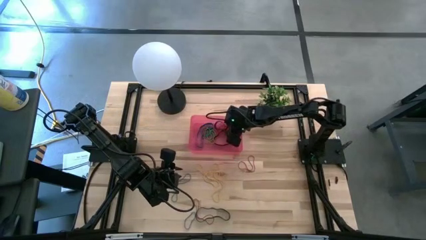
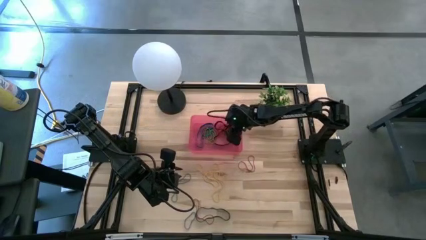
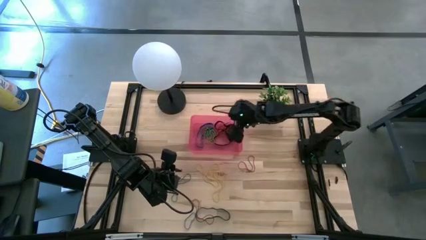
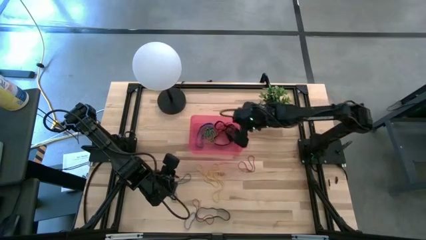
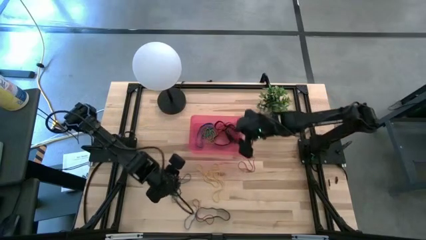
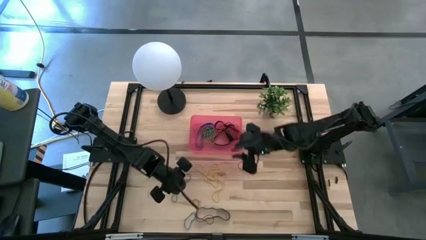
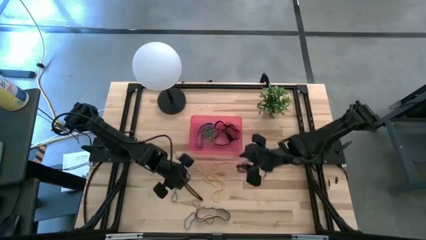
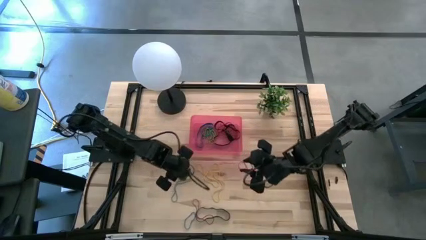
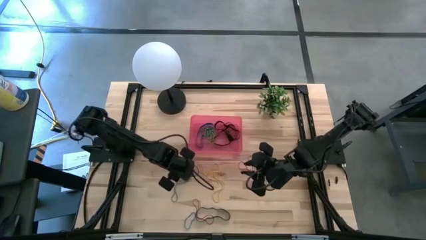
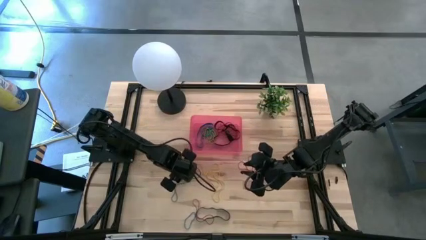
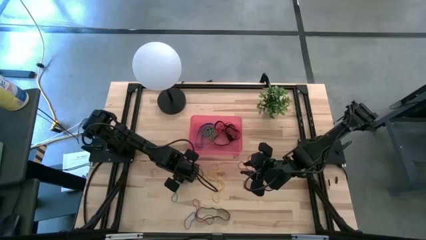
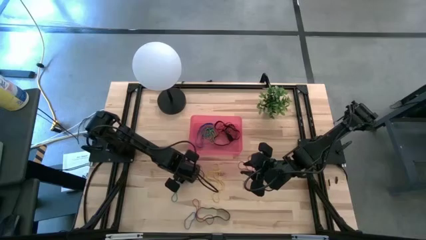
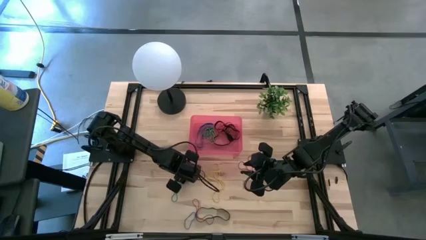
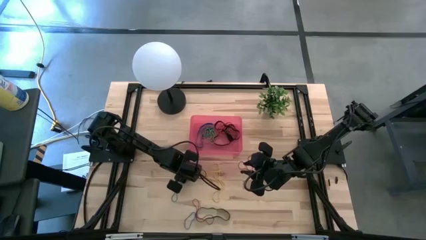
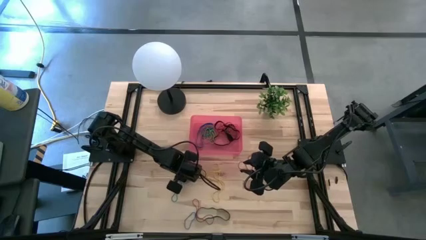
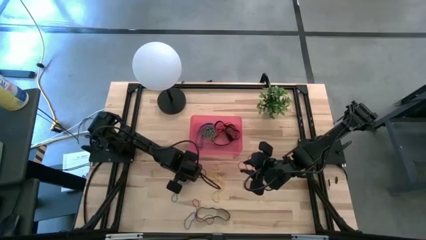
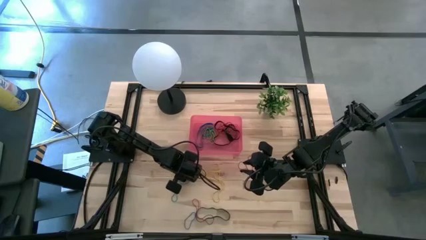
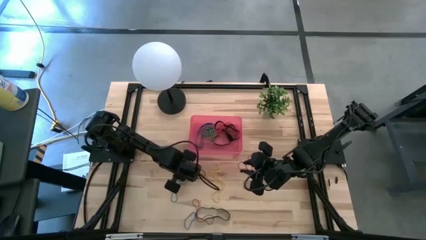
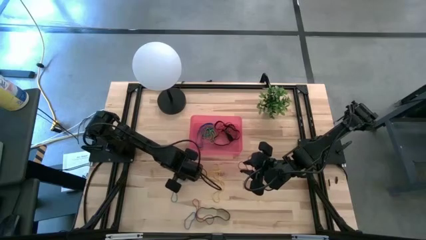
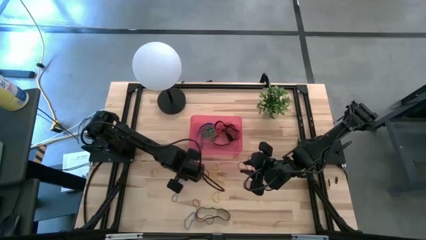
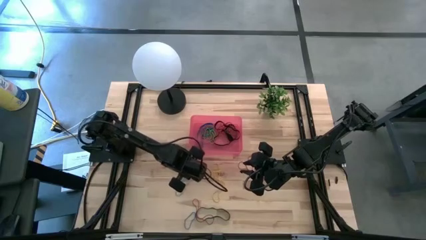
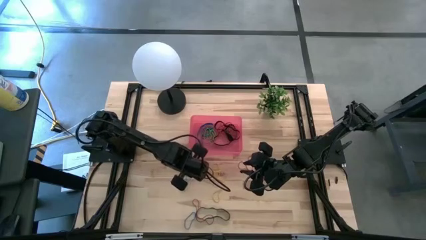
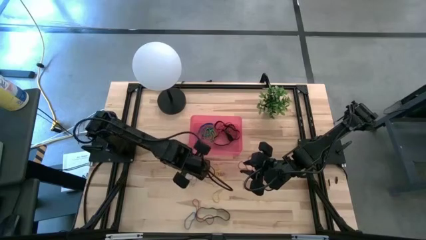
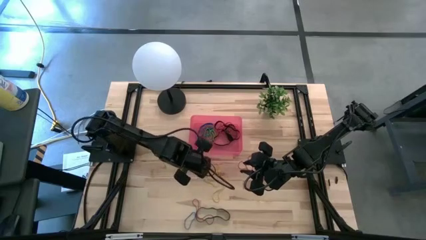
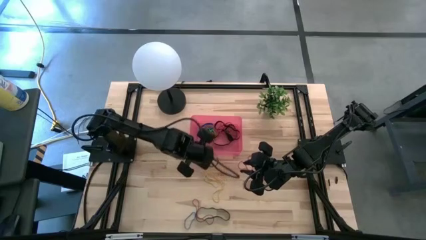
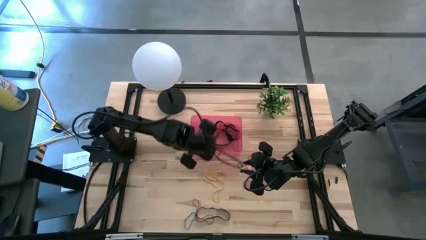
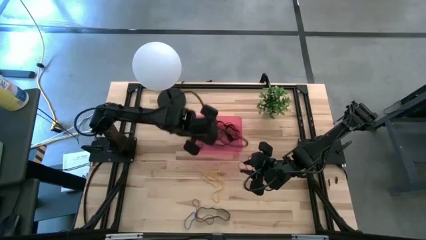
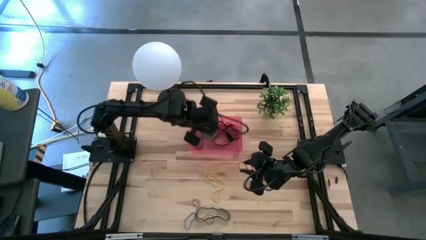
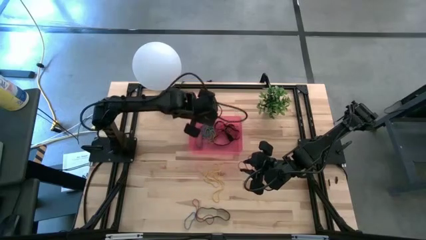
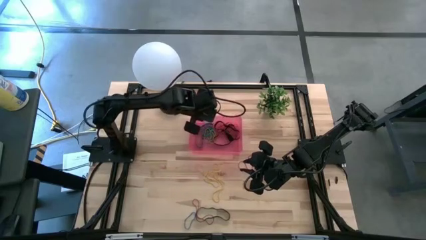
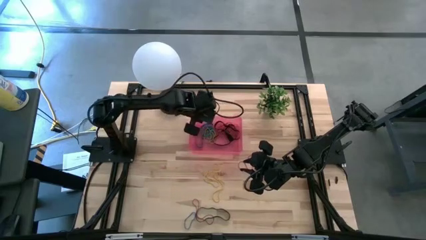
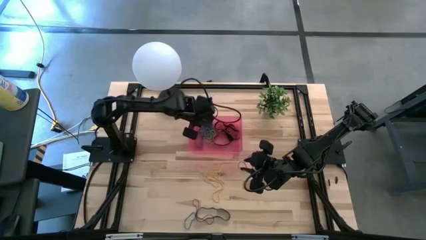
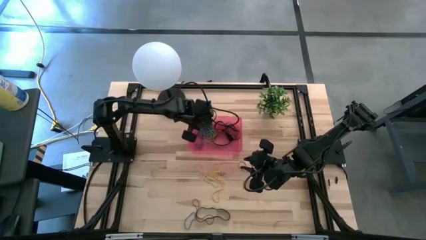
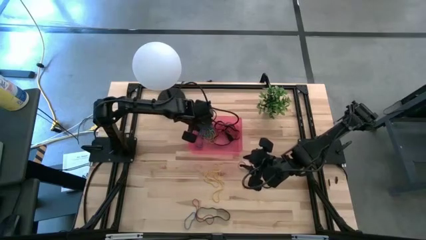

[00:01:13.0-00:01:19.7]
Task: Pick and place rubber bands into bin
Put the blue rubber band into the red bin

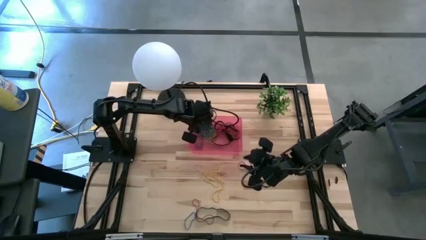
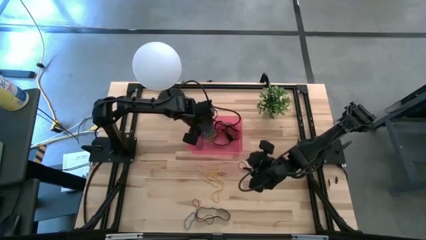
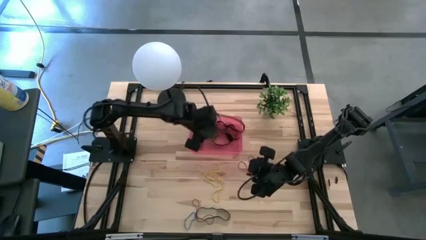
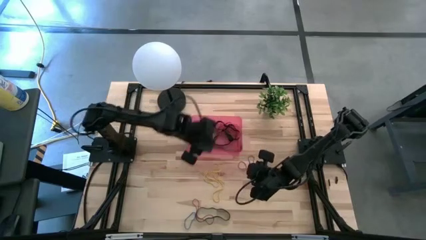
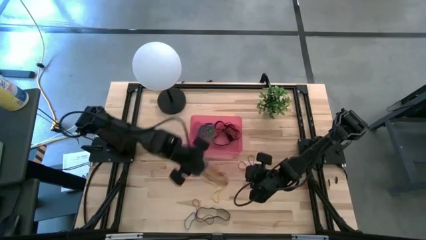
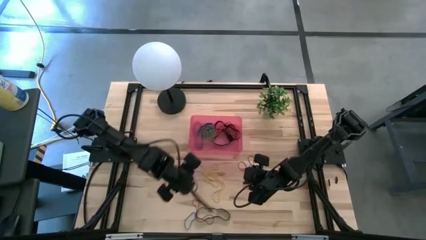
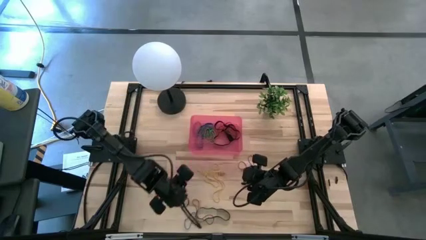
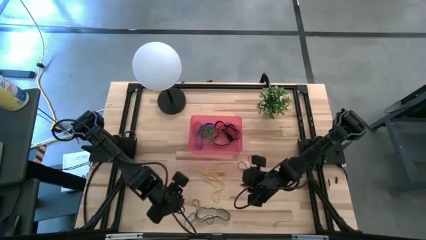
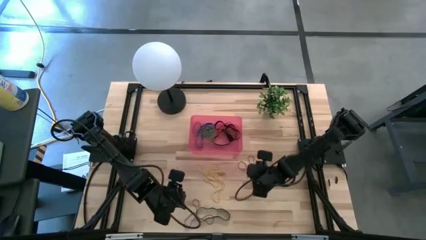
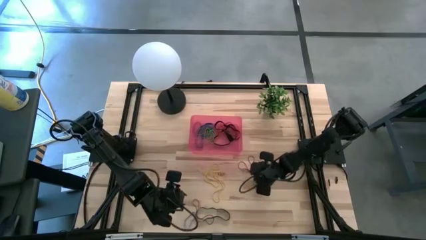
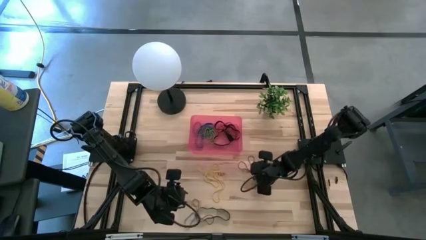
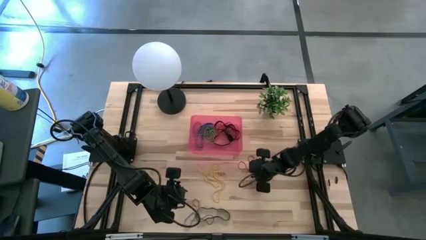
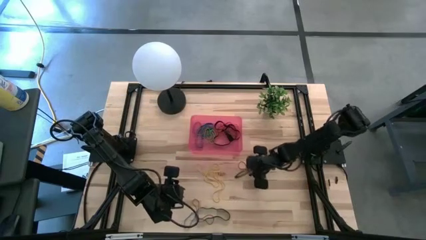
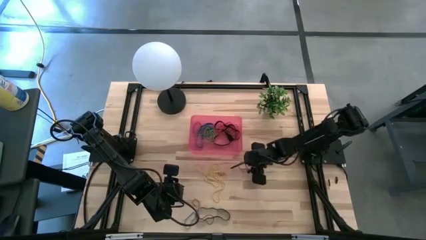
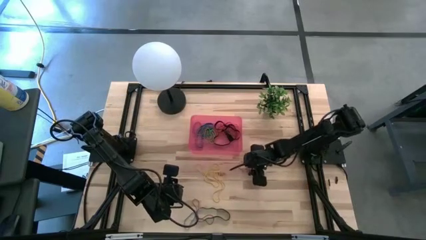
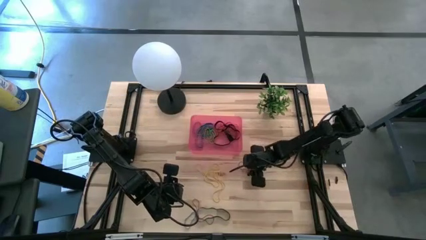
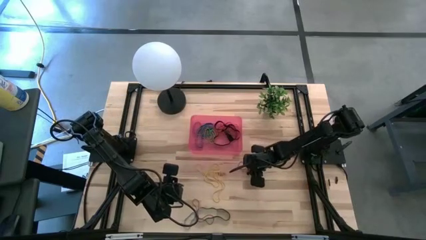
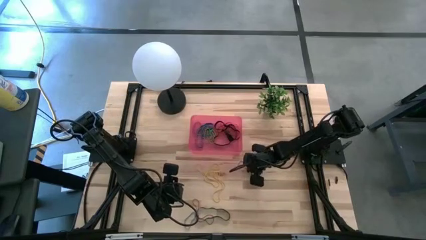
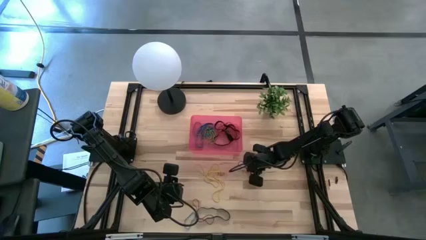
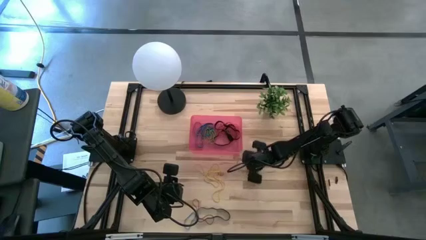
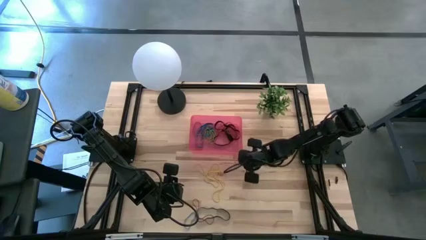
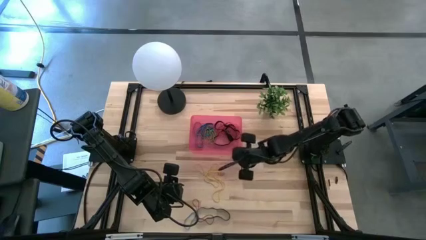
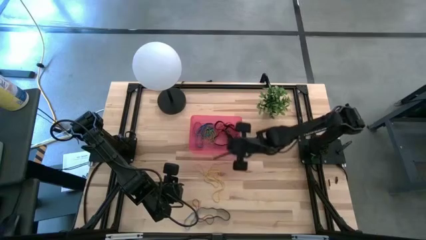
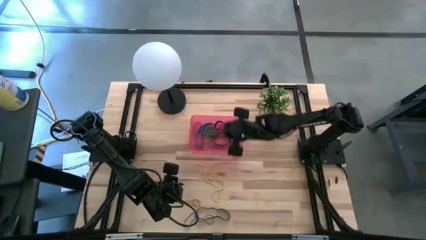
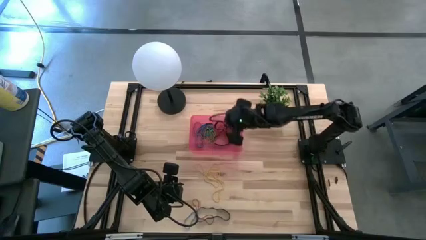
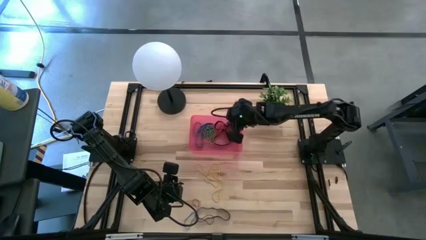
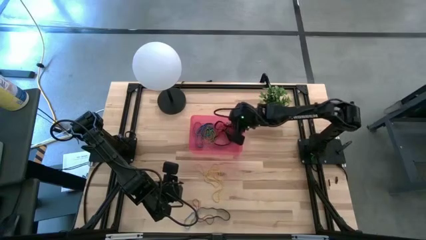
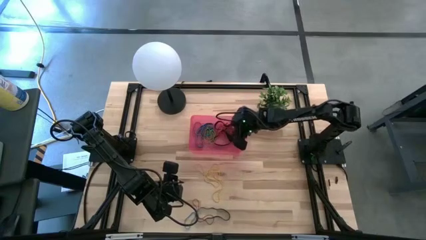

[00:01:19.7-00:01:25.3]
Put the red rubber band into the red bin

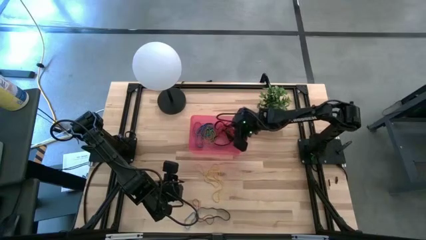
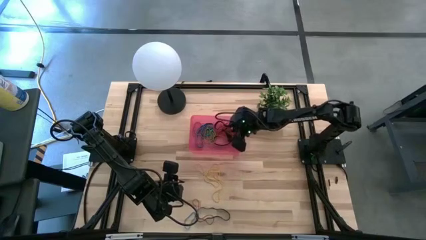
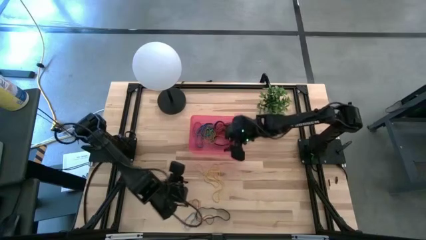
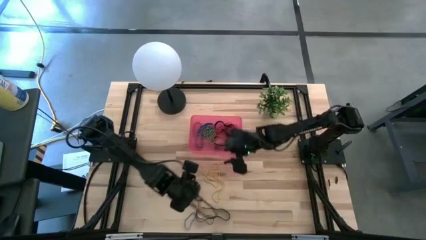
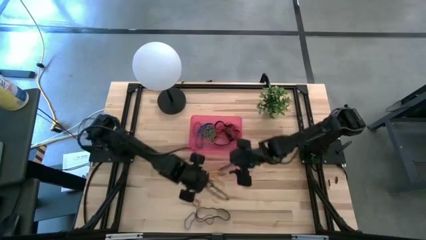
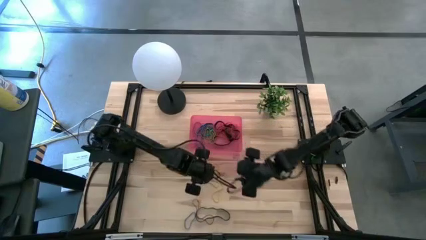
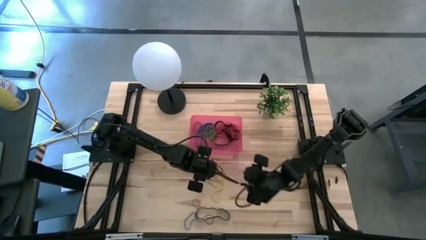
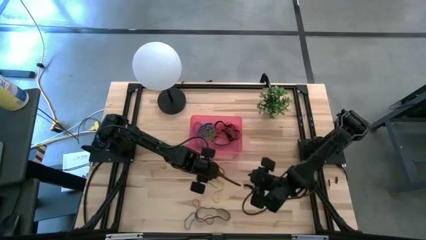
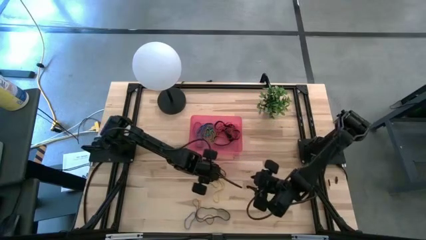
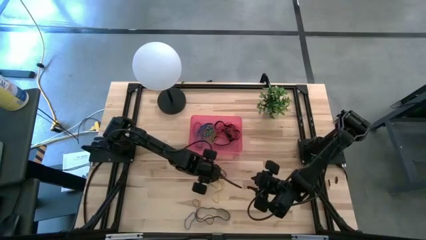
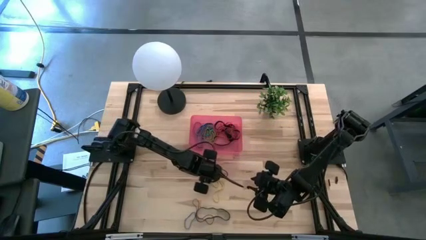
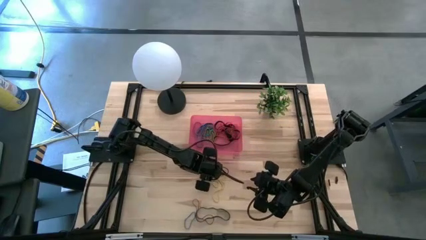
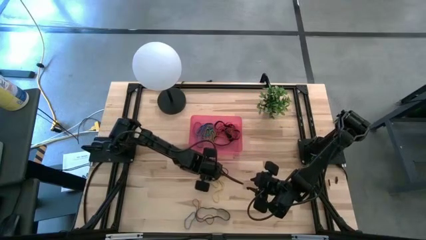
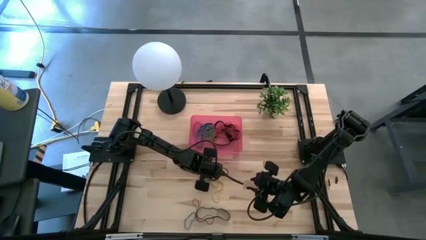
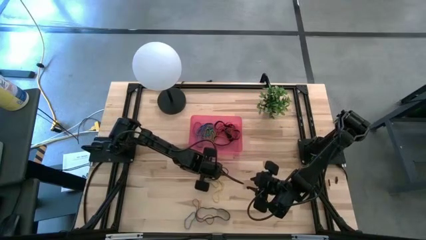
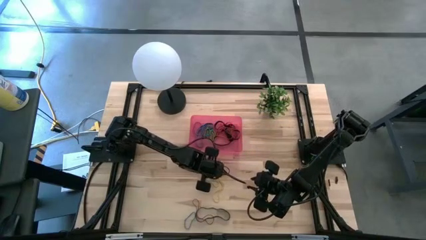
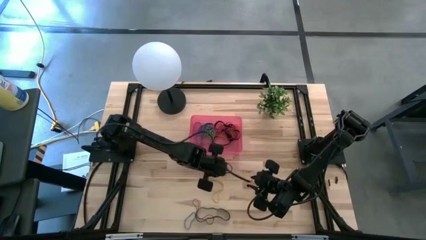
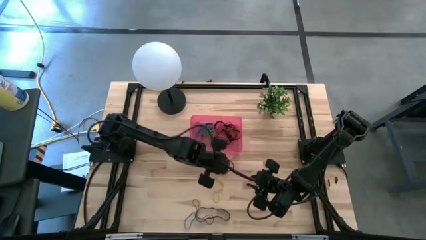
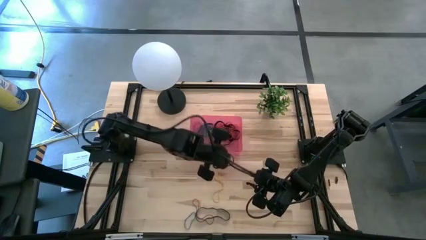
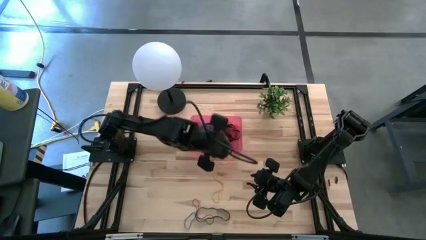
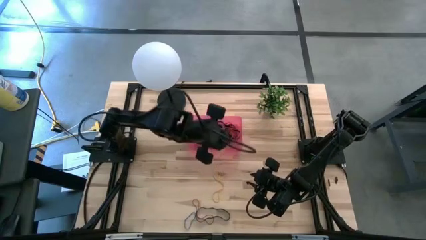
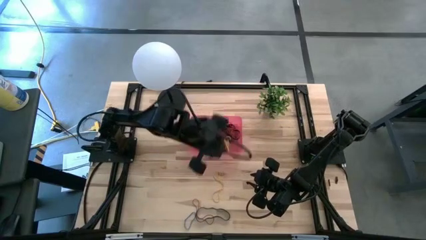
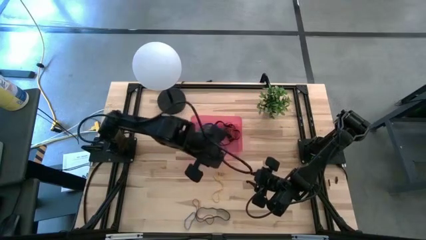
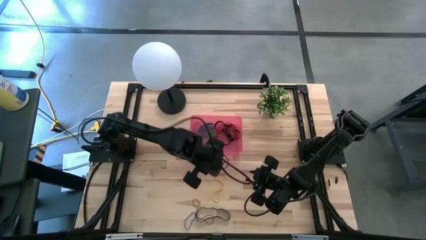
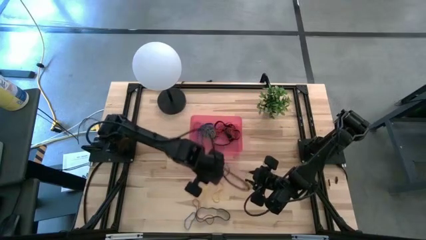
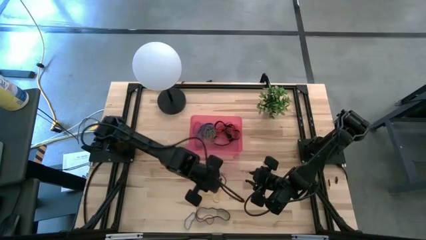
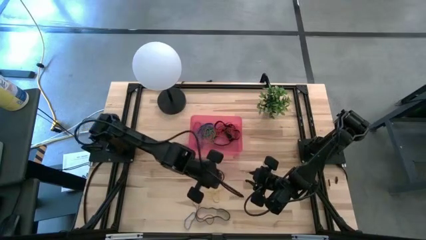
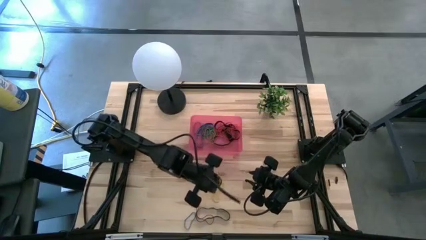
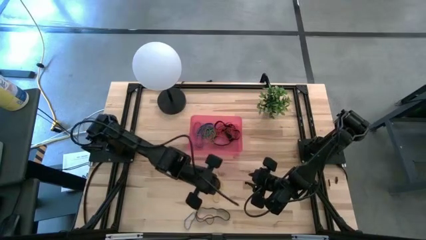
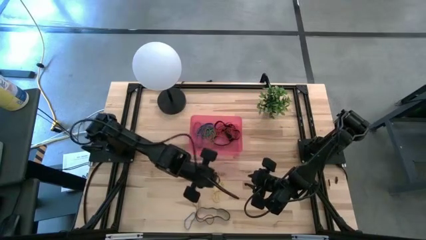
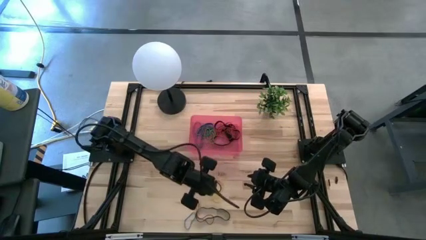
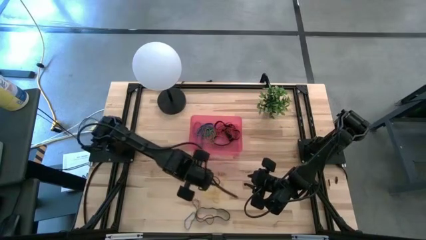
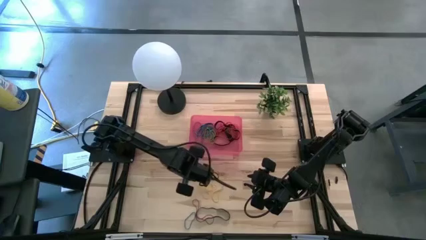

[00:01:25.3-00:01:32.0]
Put the yellow rubber band into the red bin
